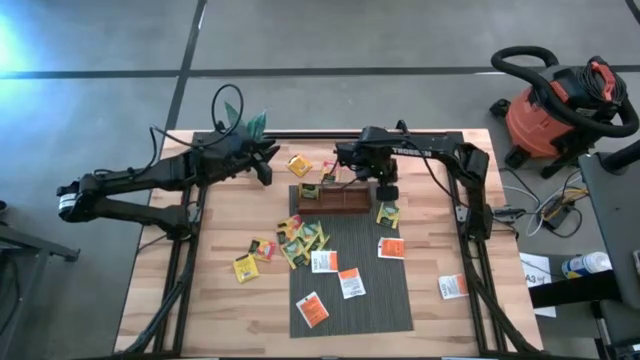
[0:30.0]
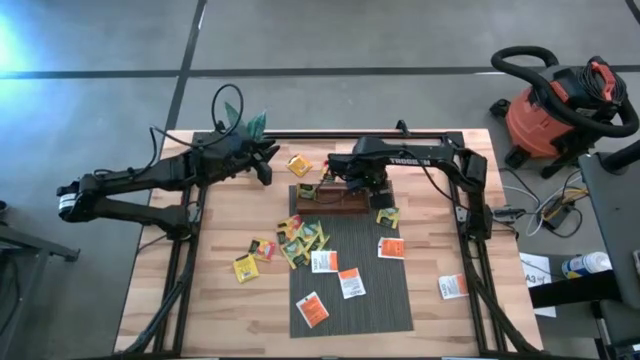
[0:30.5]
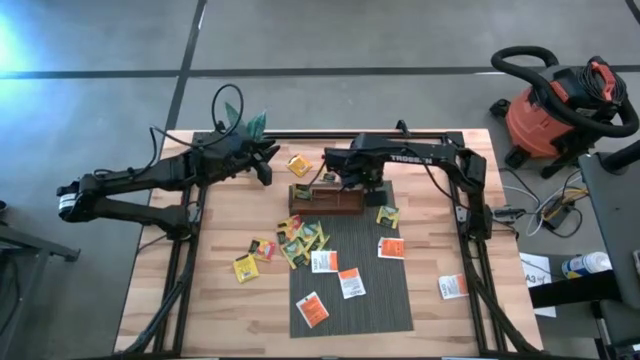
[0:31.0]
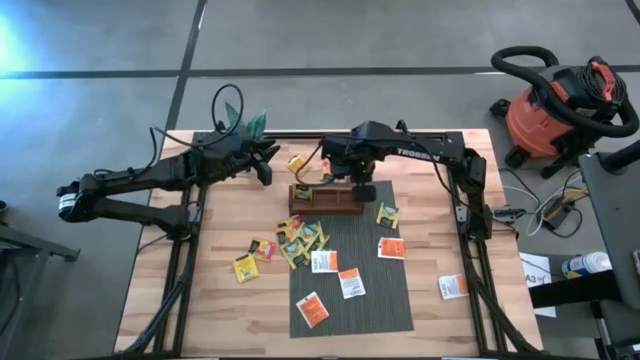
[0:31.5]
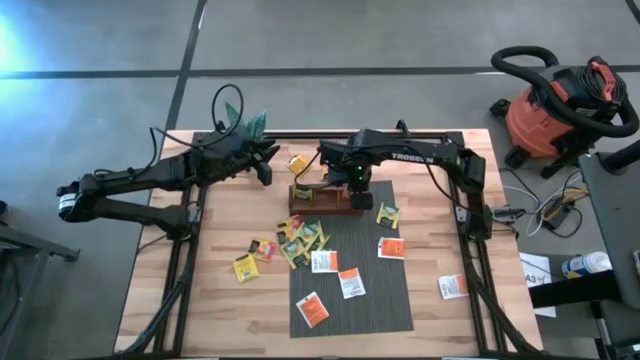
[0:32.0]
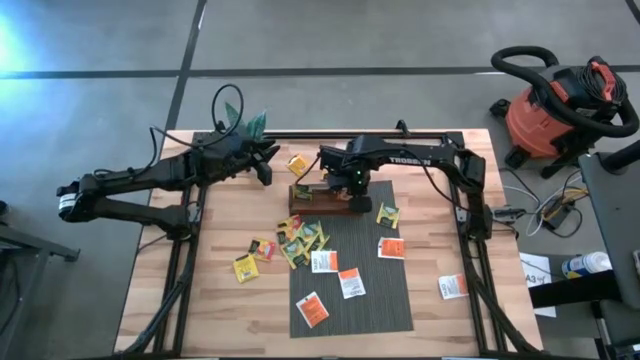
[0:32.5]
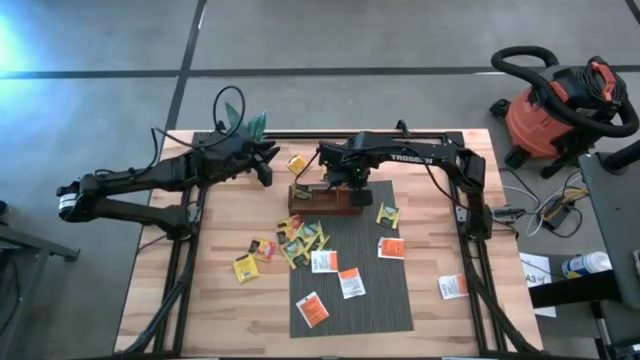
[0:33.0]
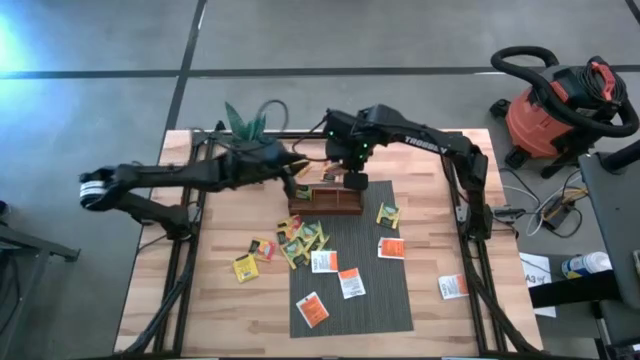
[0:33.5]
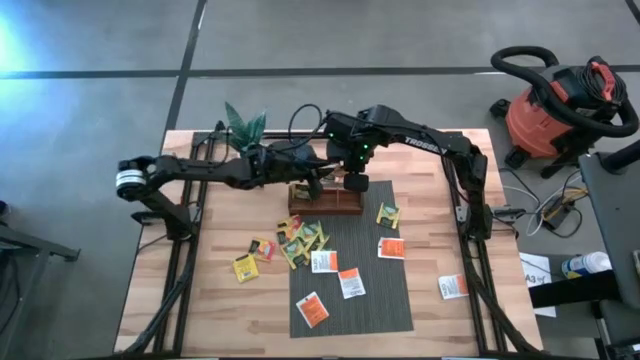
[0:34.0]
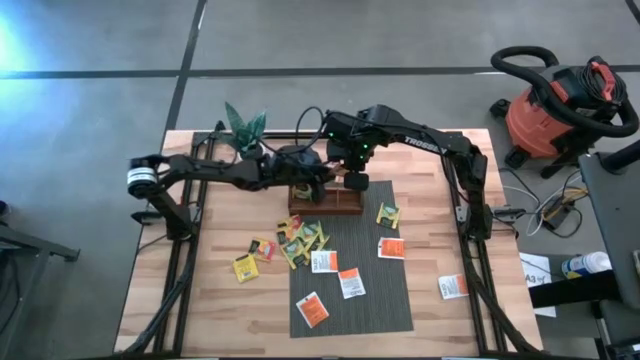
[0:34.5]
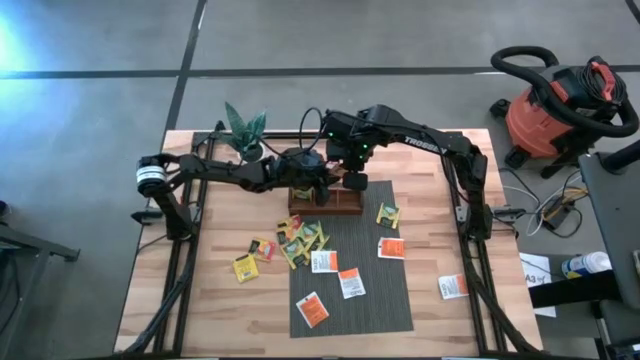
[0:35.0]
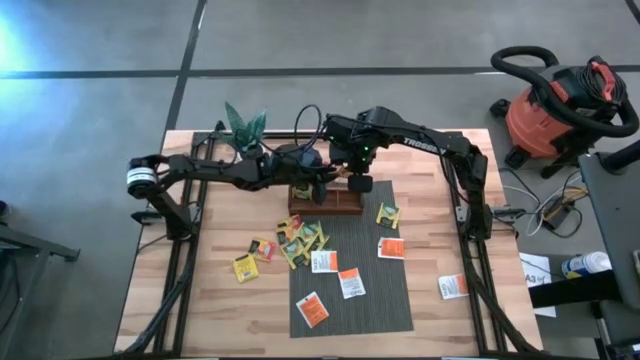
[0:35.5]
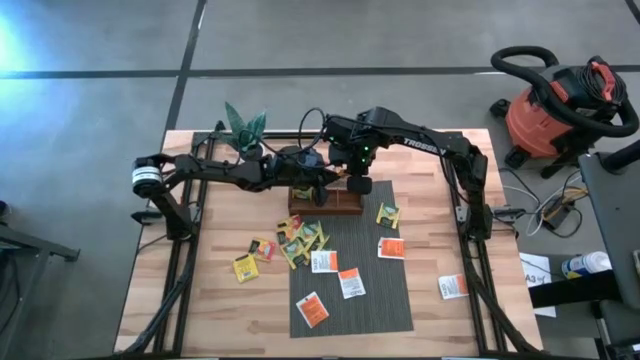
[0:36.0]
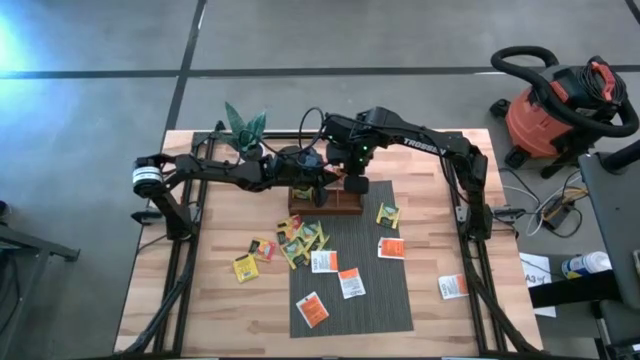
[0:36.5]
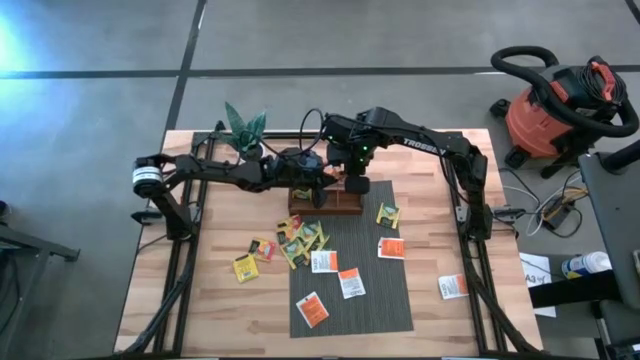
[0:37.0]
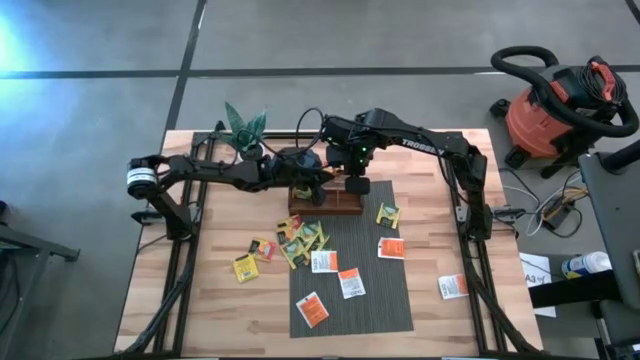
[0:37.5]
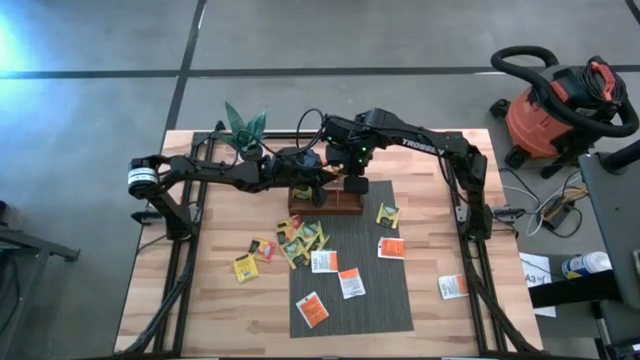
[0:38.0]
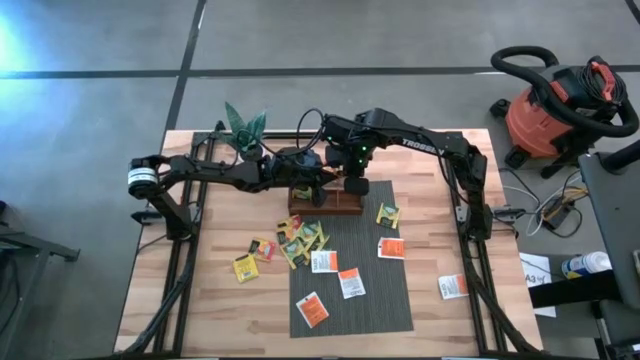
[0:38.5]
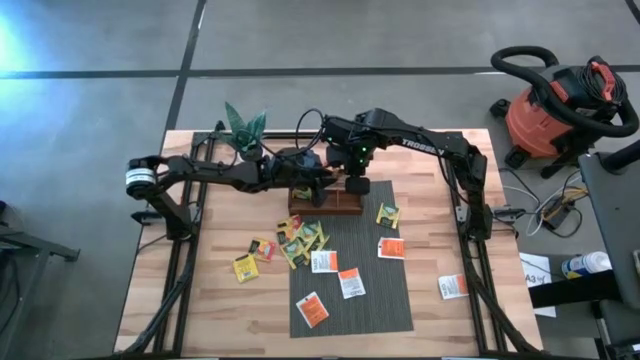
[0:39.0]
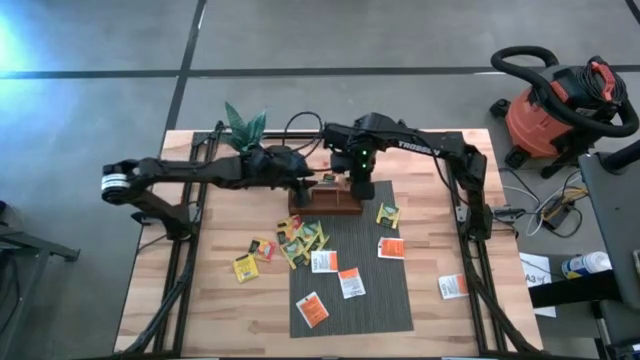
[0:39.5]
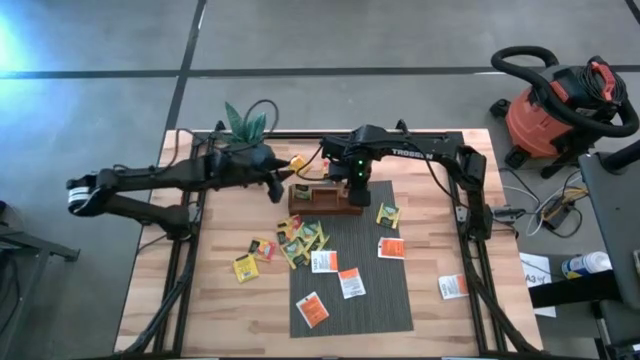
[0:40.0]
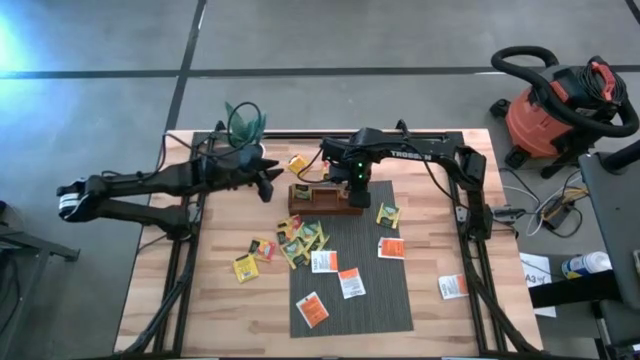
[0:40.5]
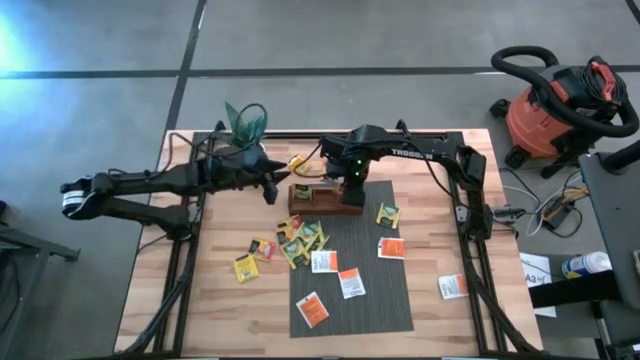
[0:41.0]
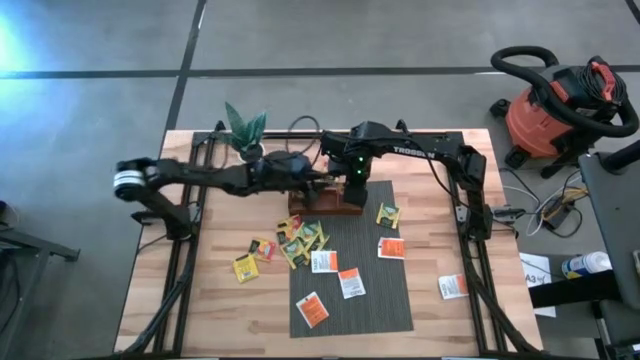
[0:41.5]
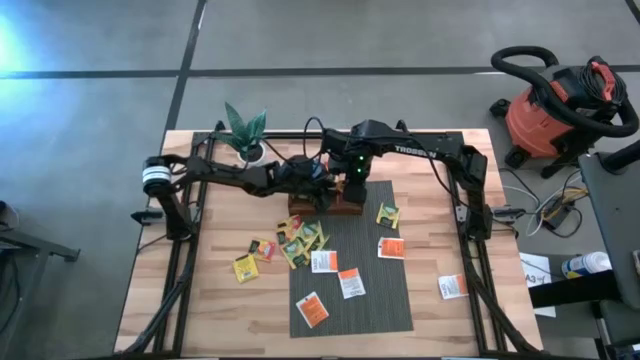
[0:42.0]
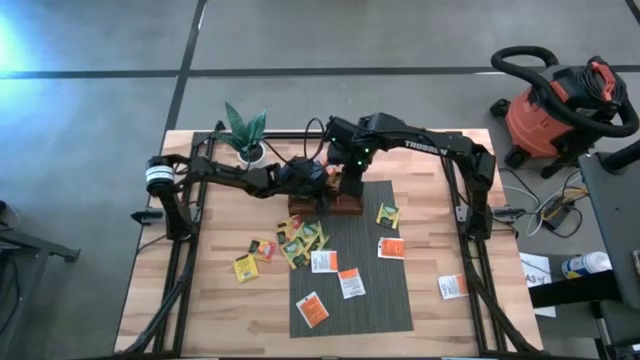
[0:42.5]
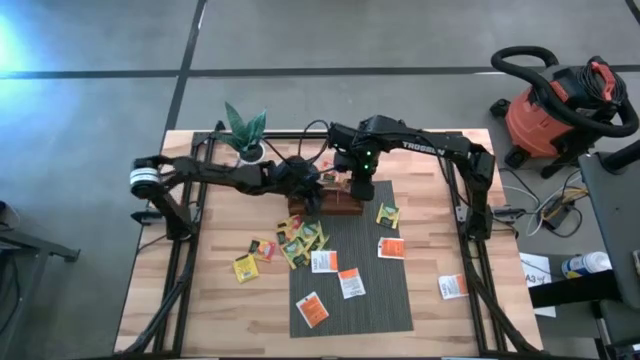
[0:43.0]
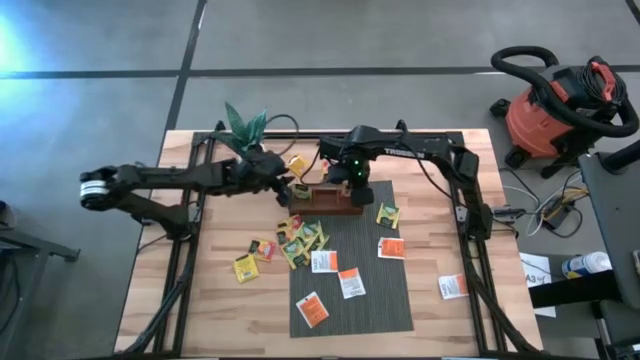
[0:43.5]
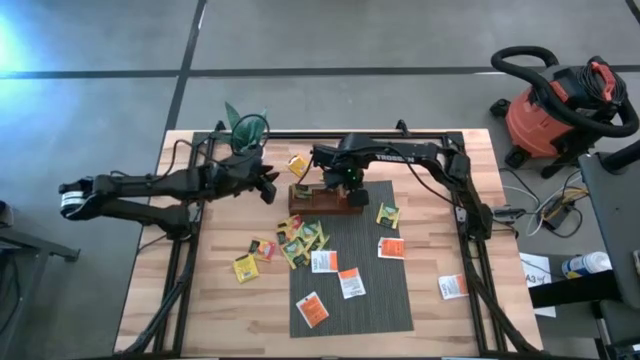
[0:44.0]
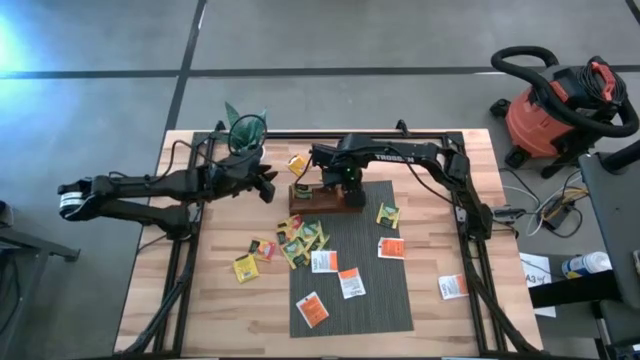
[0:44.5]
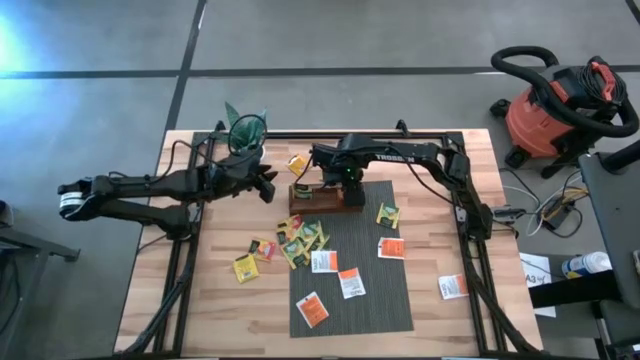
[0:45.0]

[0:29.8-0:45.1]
Task: Pick & Place Tea
Put the orange tea bag into the right compartment of the wooden organizer

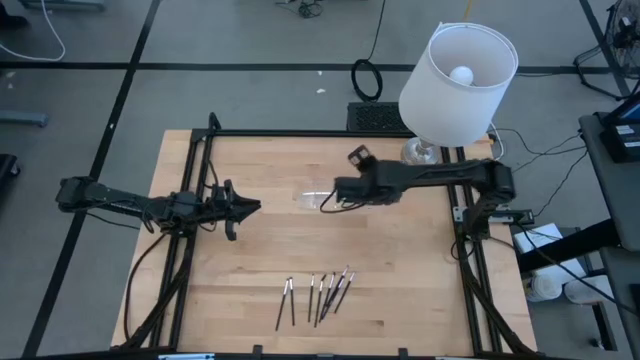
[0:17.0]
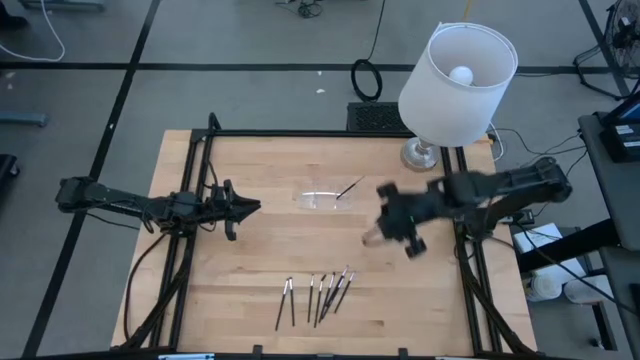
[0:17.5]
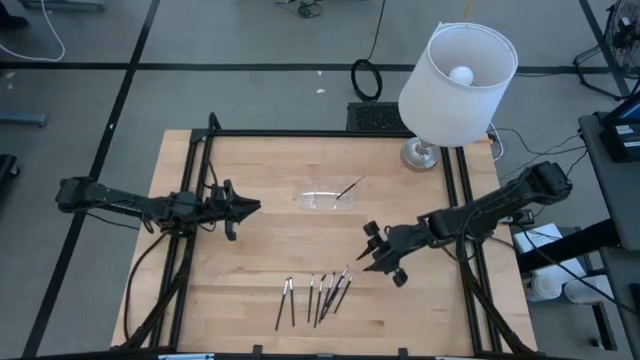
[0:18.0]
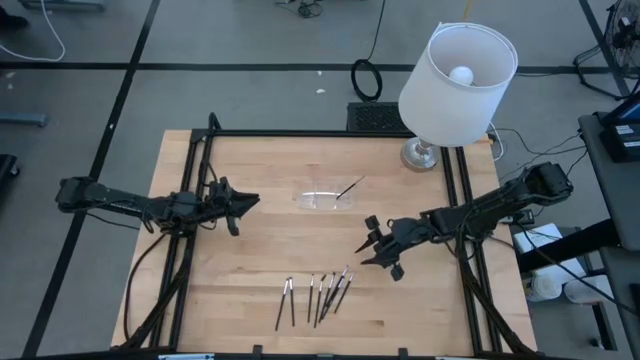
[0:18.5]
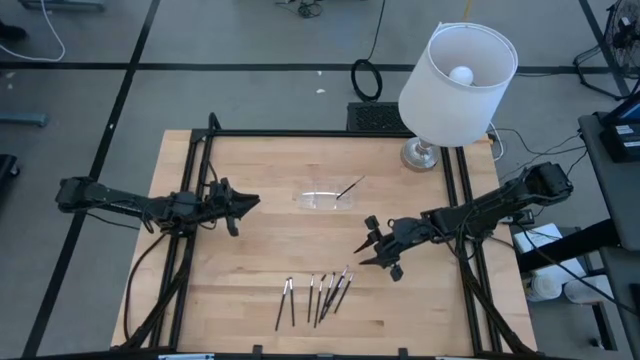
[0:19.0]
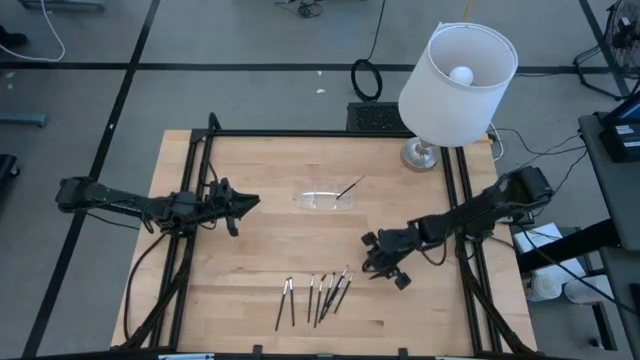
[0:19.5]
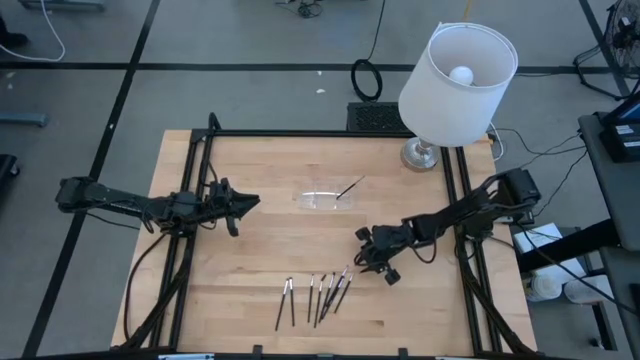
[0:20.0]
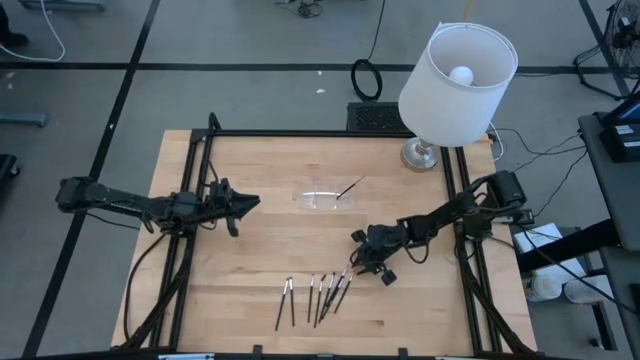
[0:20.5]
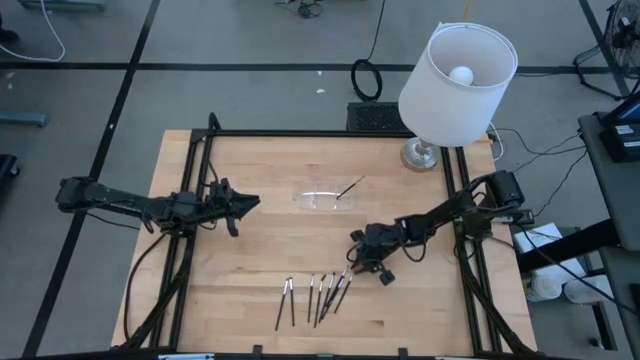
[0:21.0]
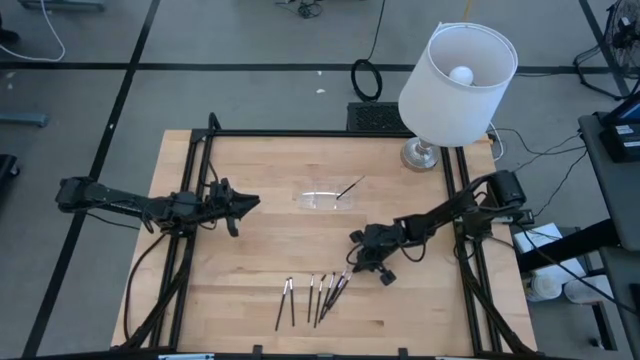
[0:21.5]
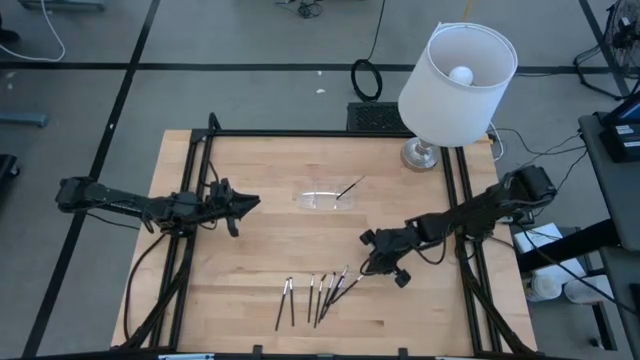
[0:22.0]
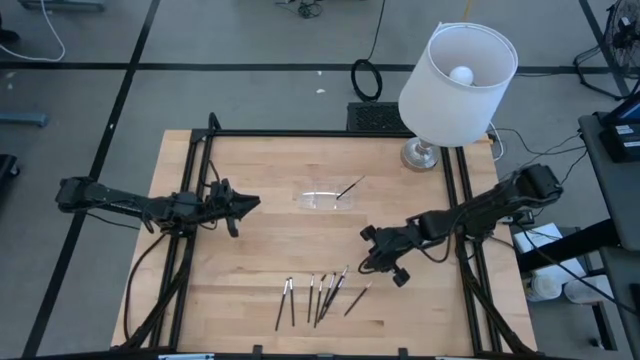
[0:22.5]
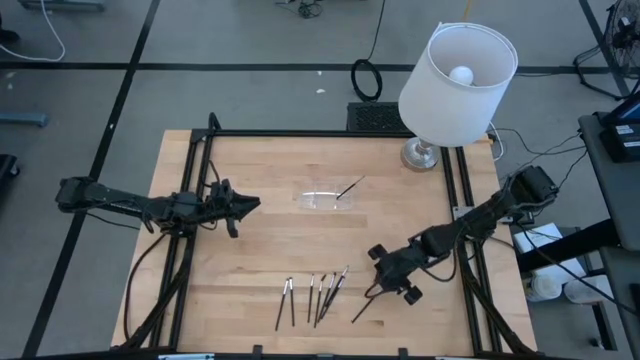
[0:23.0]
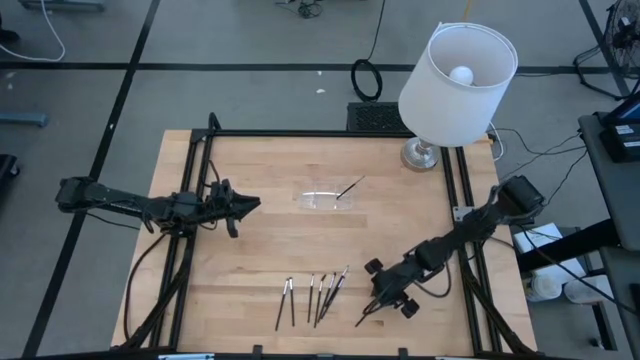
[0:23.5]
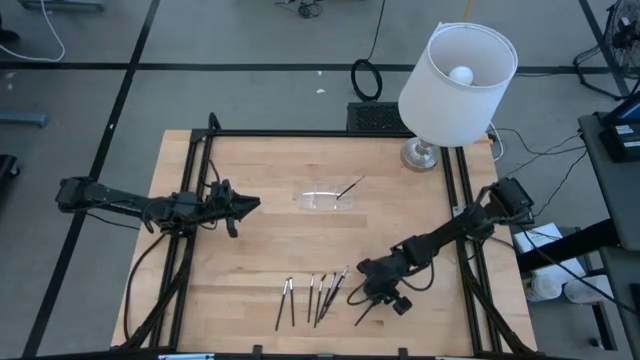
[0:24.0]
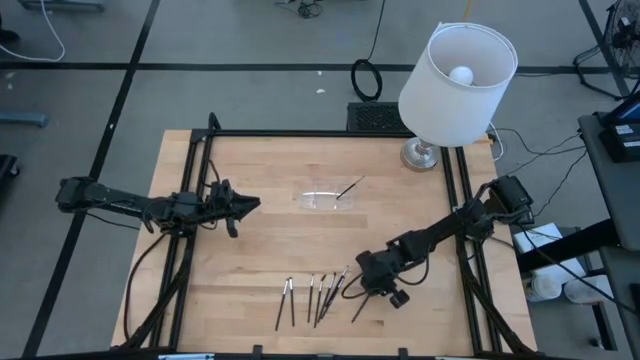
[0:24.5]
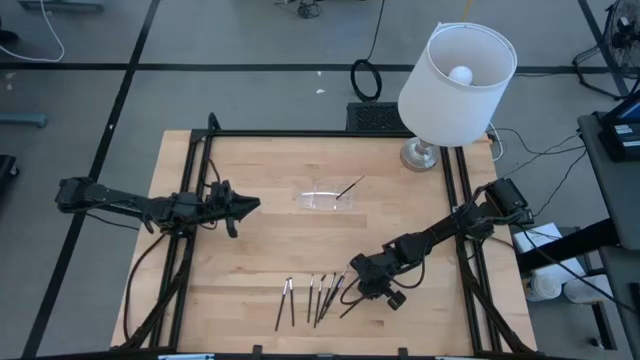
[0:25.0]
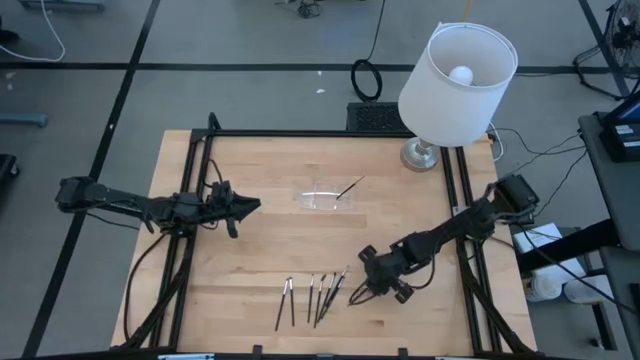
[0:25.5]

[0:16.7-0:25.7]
Task: Put items in baskets/containers
Put the black liner brush into the transparent organizer
